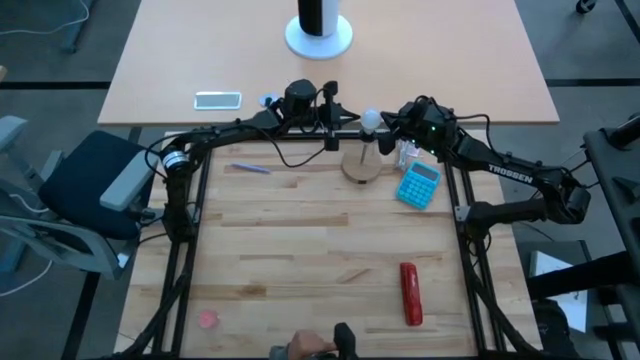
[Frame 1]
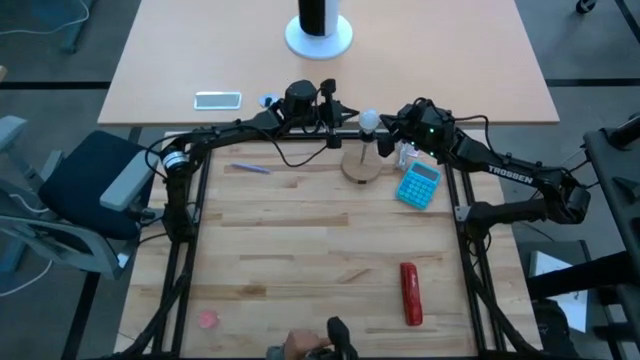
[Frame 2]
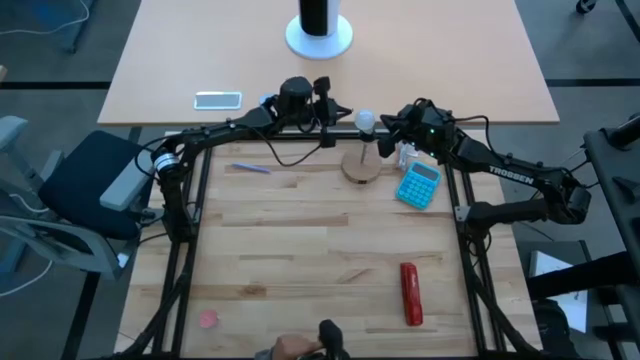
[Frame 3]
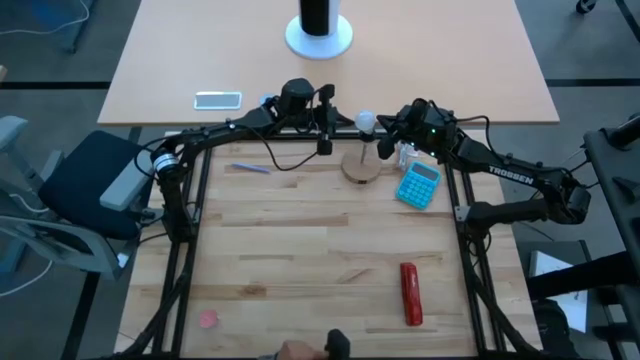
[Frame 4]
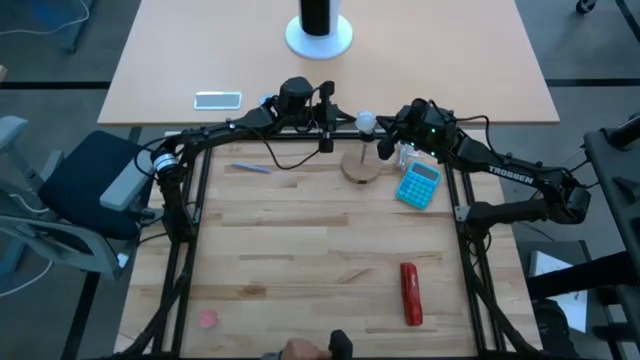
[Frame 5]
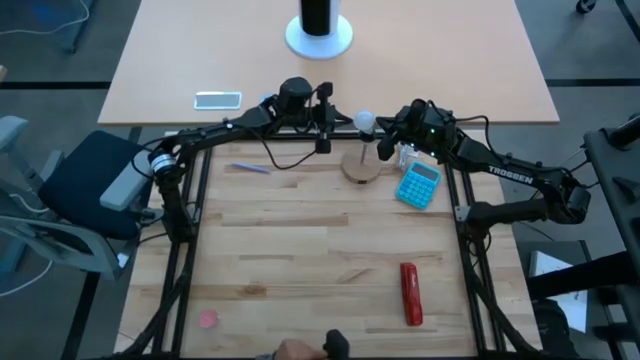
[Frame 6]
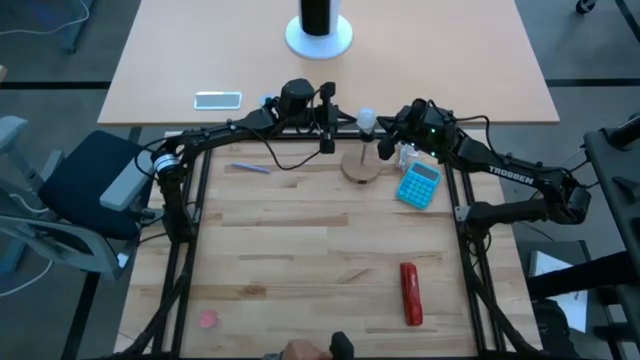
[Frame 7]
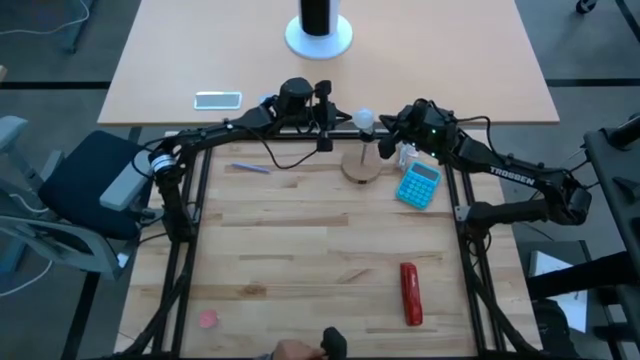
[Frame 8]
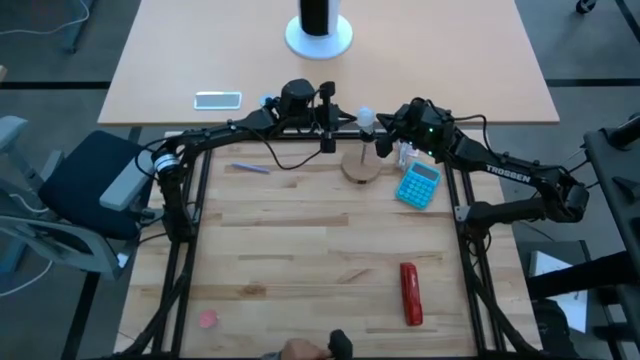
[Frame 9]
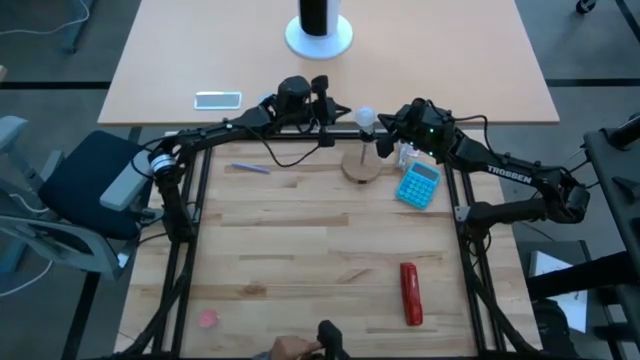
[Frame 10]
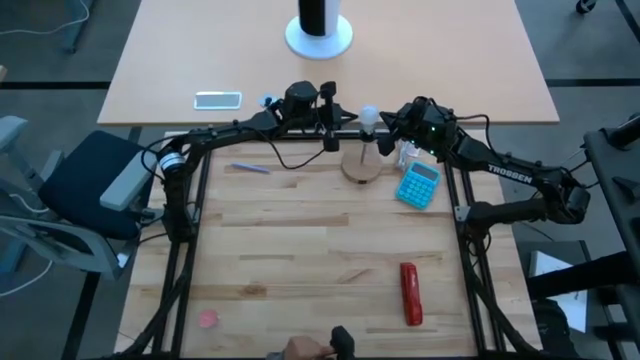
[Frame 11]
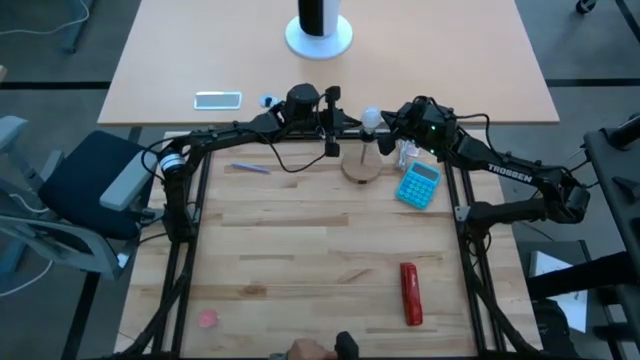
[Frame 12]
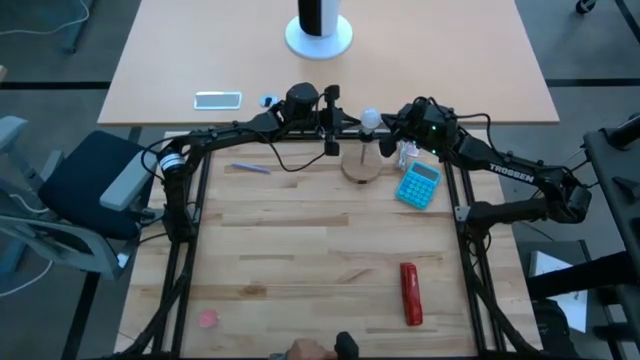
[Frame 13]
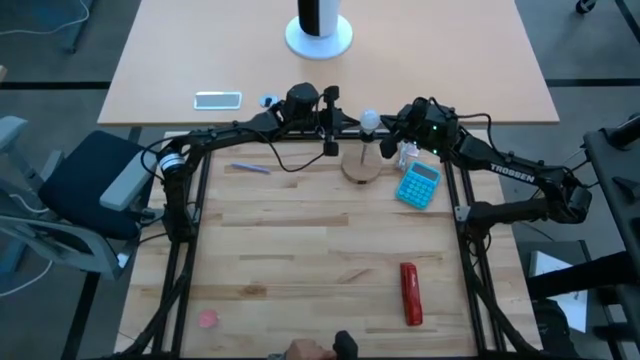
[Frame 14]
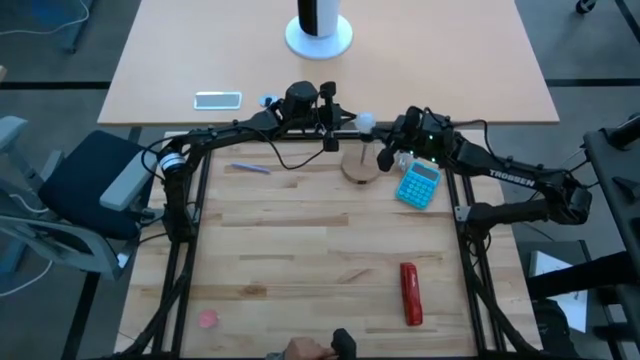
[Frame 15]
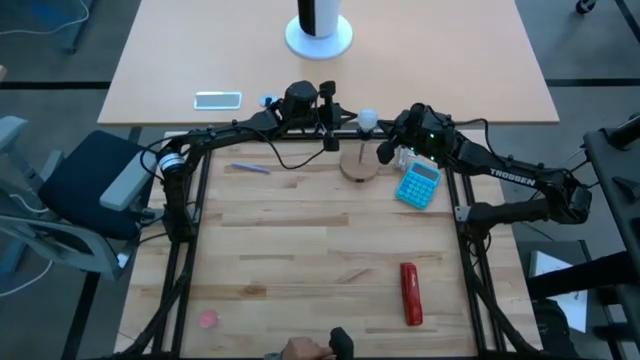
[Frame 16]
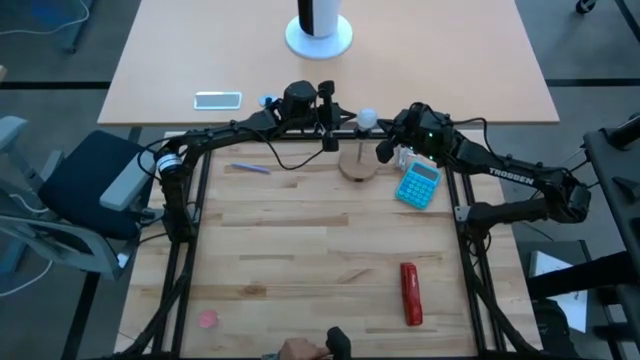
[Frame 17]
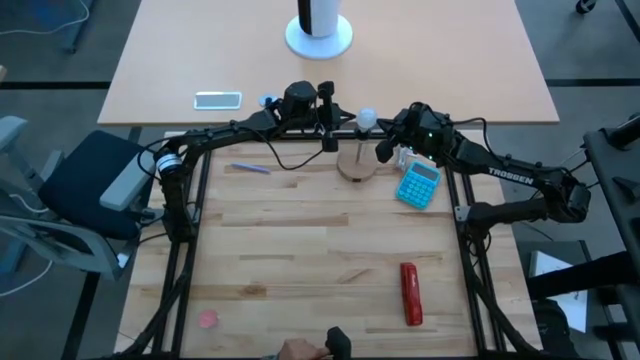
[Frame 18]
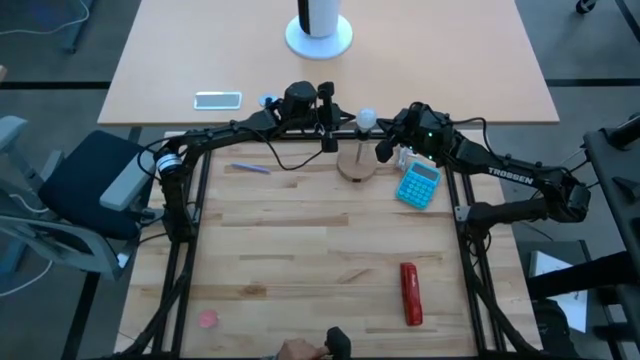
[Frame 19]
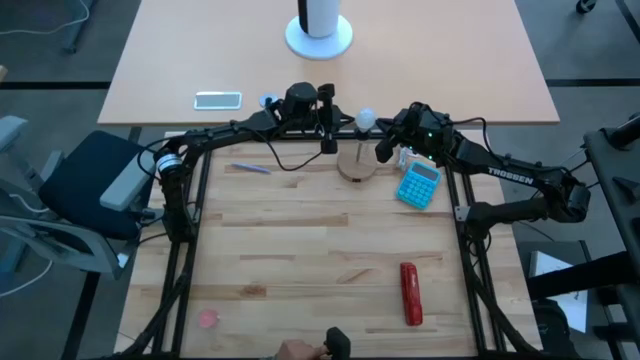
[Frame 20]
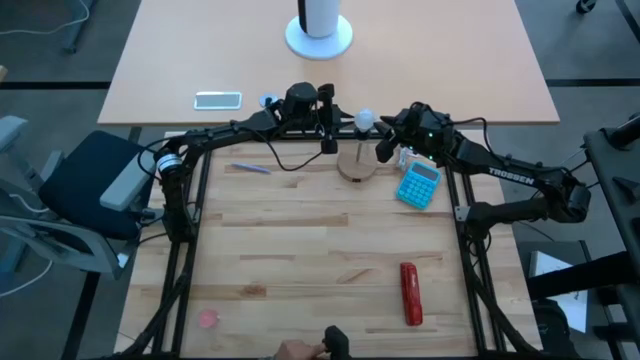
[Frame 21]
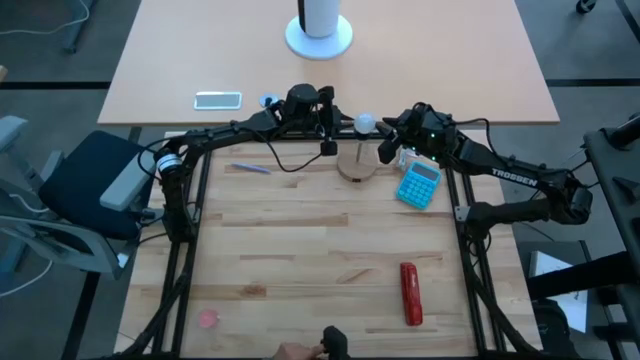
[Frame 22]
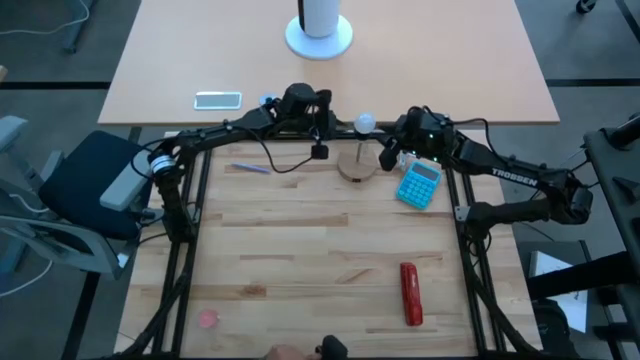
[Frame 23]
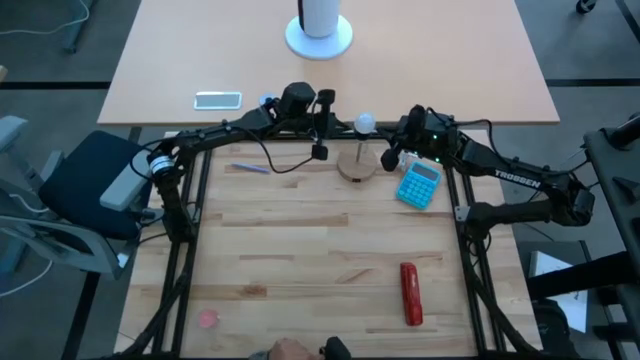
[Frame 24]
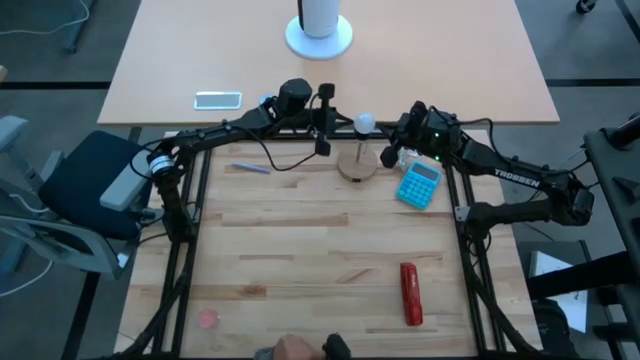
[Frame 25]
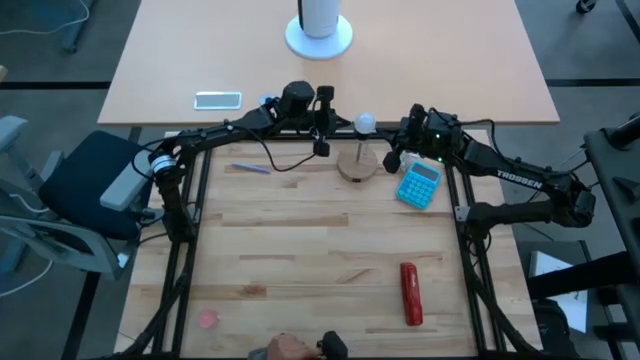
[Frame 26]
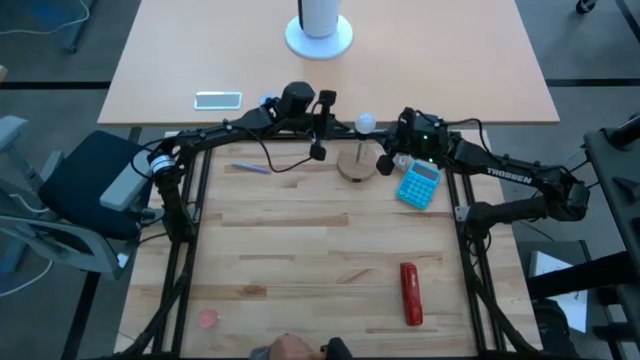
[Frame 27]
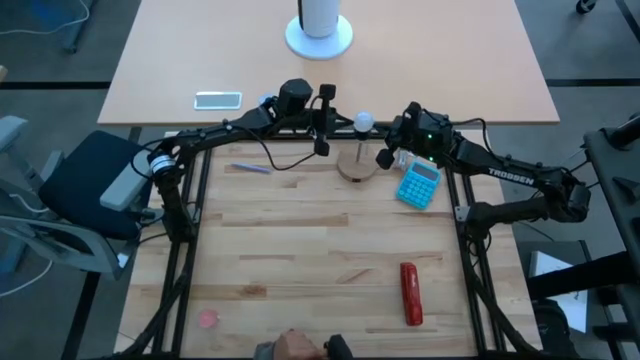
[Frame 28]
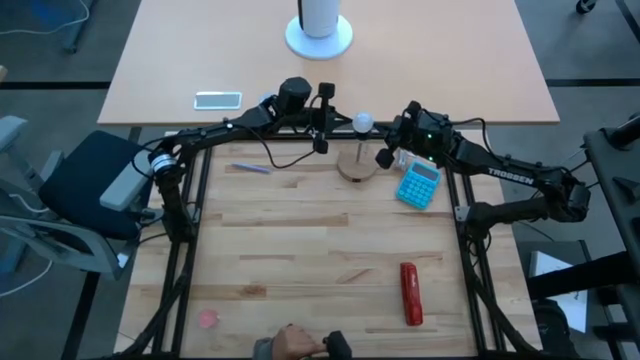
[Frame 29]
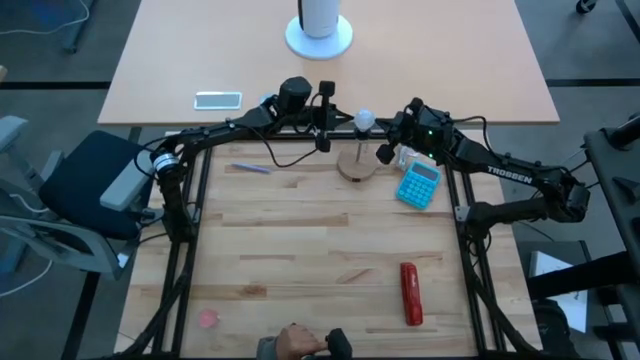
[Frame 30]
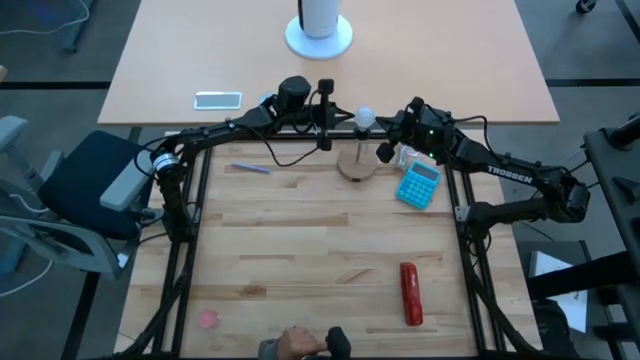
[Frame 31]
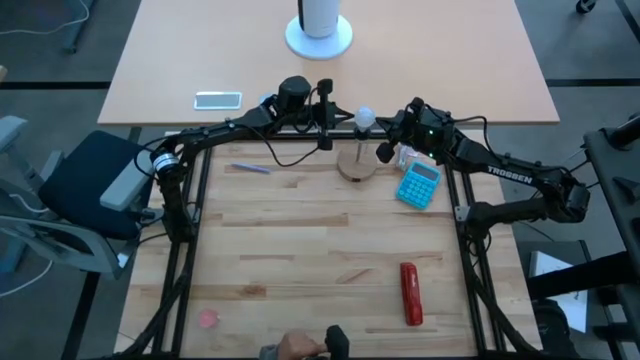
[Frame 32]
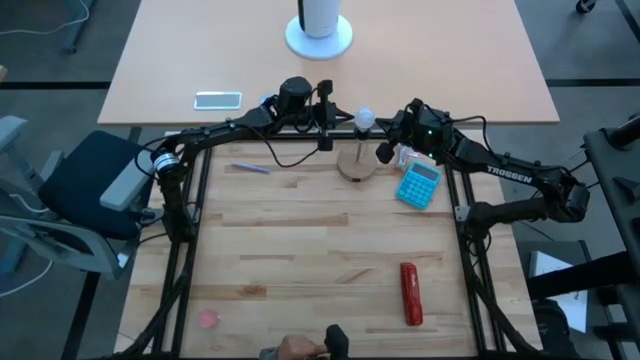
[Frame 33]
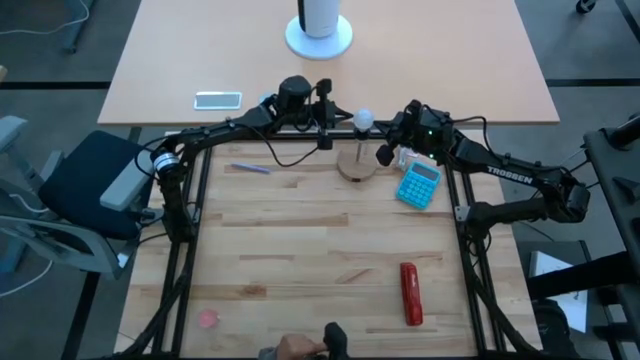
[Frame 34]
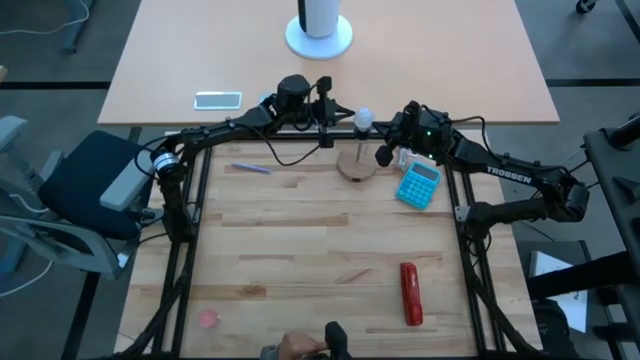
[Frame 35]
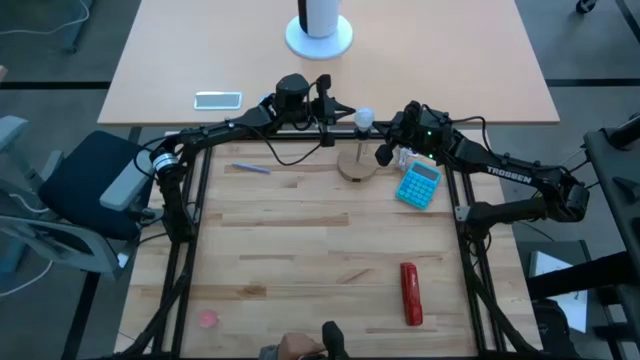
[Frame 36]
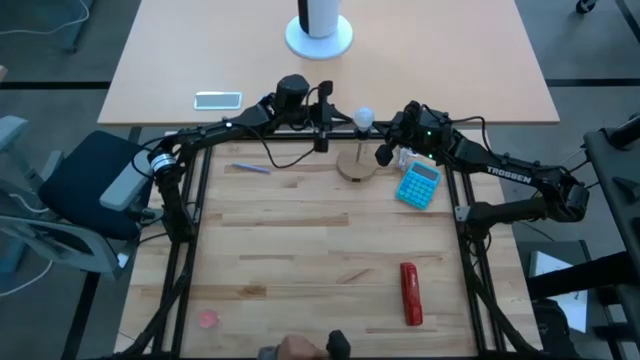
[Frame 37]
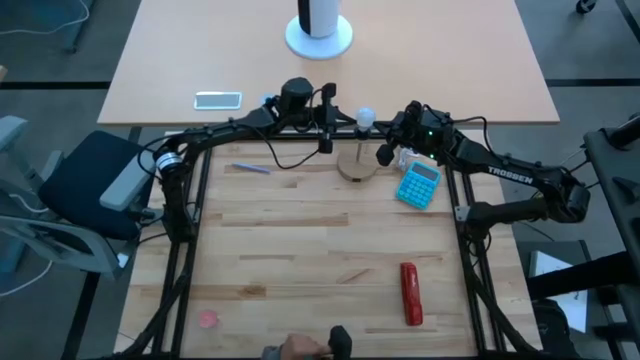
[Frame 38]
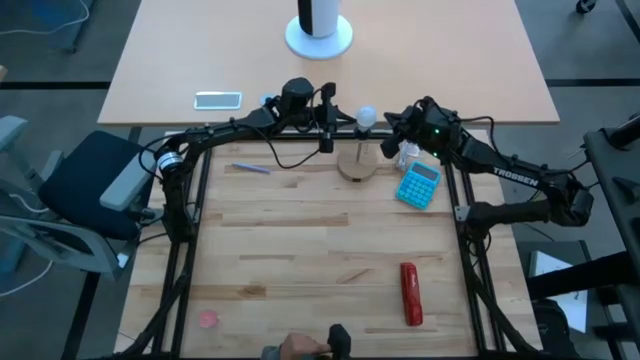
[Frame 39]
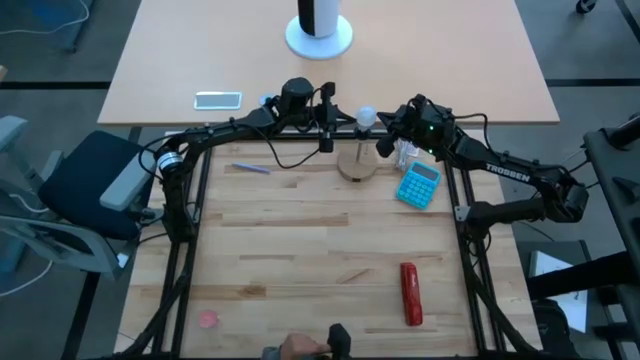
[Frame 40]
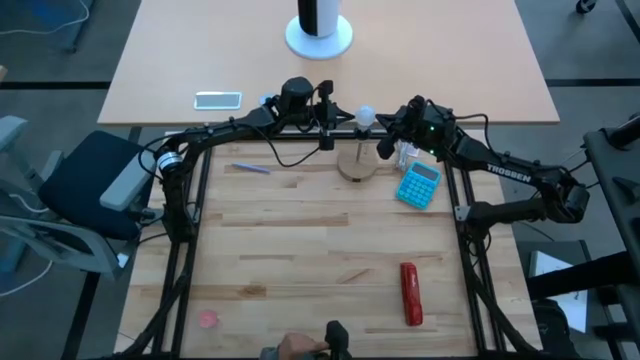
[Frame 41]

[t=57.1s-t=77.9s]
Task: Screw lightbulb
Insert the lightbulb into the lamp

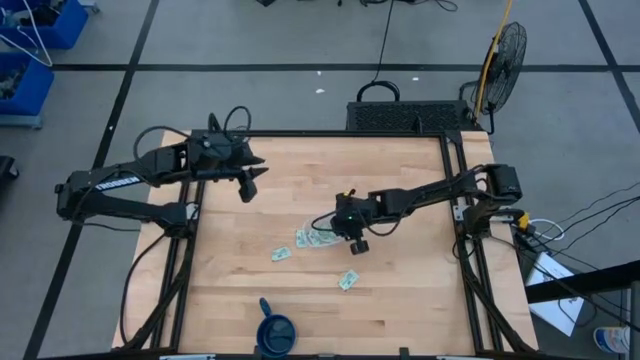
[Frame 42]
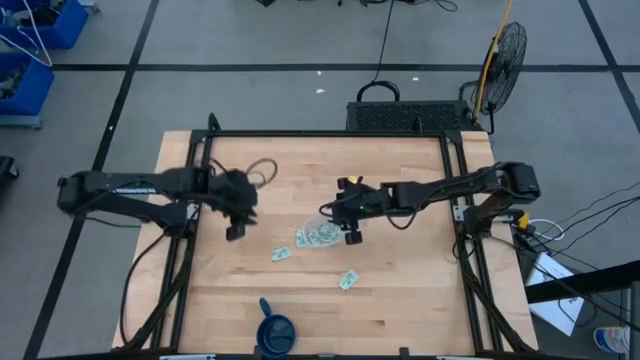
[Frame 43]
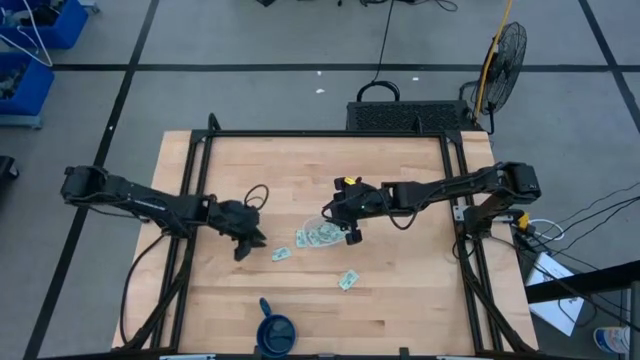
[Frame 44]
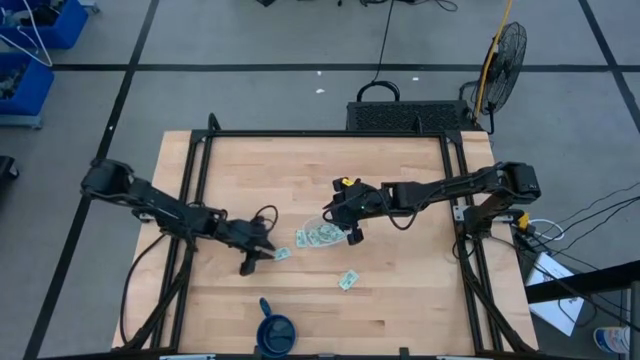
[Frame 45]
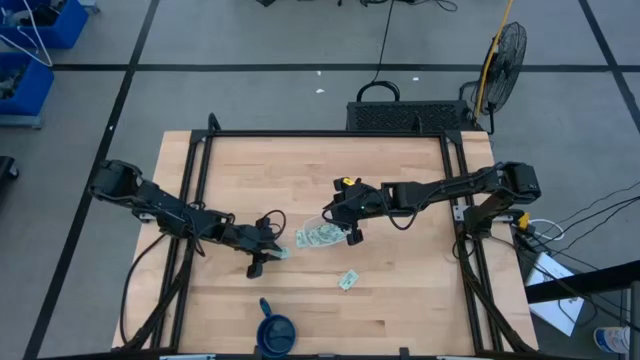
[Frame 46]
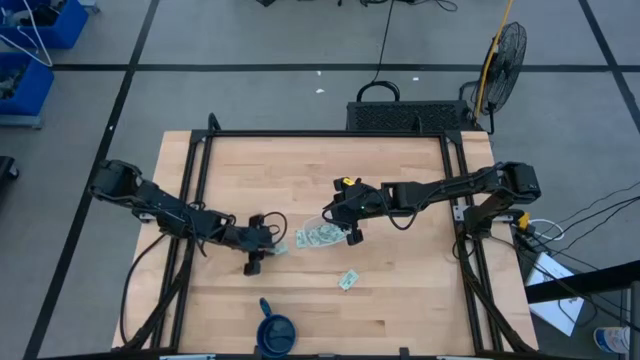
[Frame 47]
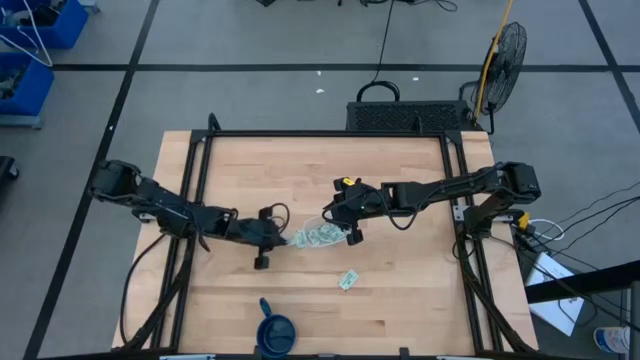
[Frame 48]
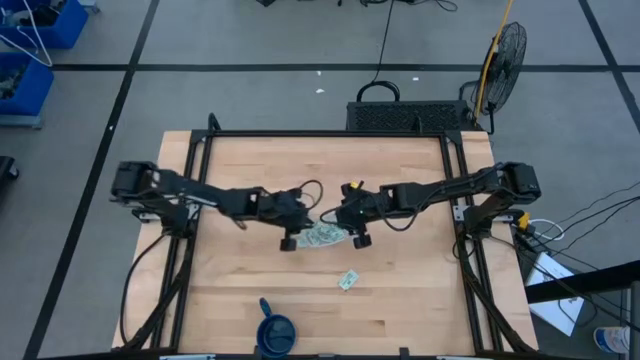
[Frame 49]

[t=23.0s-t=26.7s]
Task: Pick and place Stevia / Truvia into bins
Put the stevia packet into the transparent container
